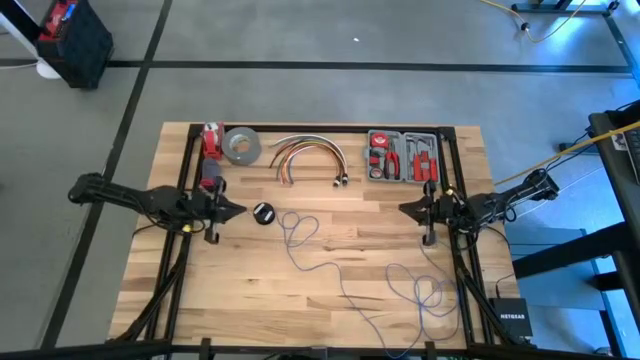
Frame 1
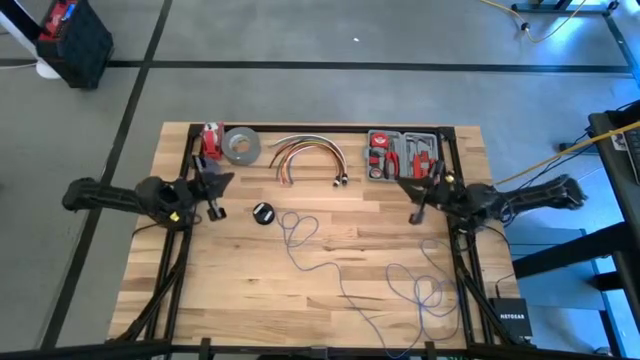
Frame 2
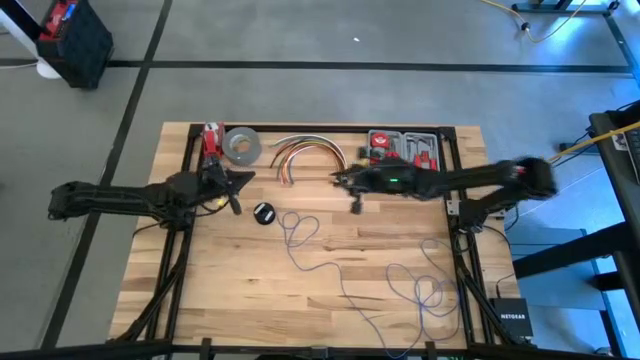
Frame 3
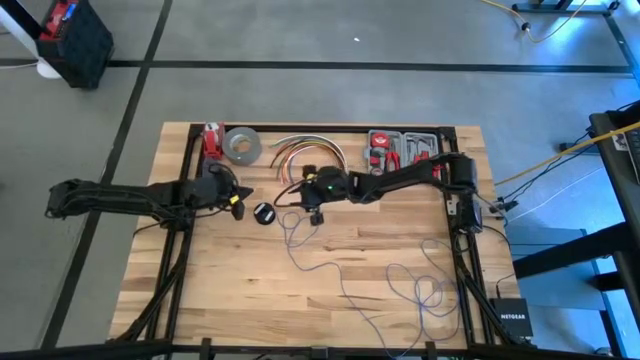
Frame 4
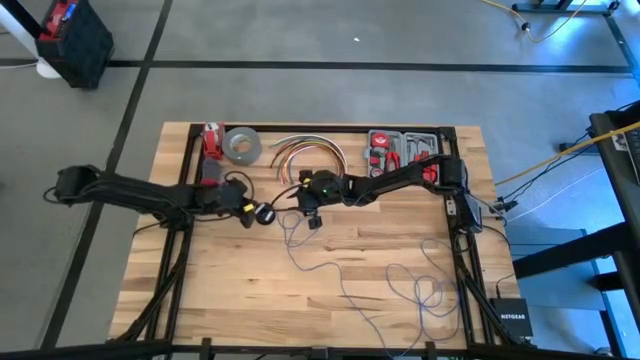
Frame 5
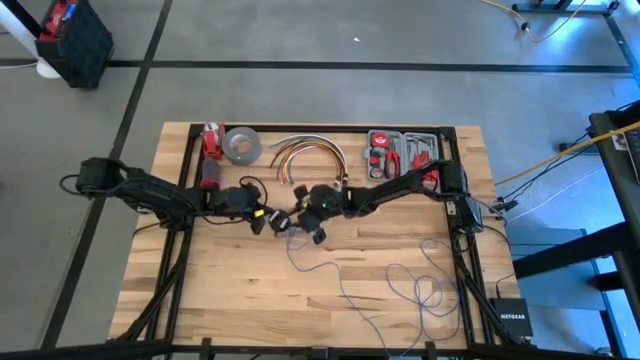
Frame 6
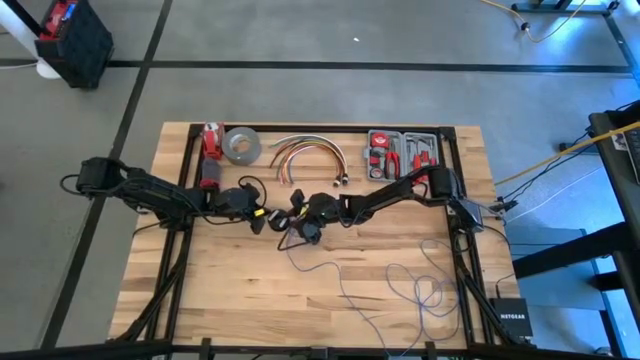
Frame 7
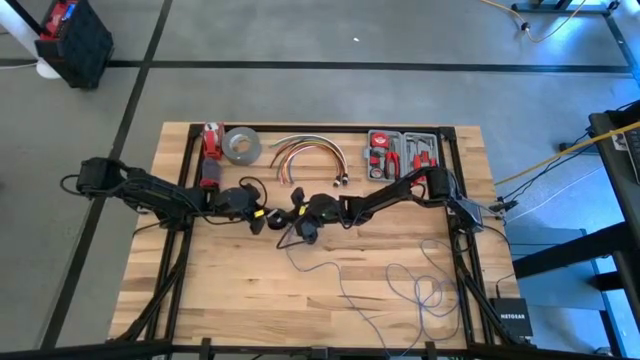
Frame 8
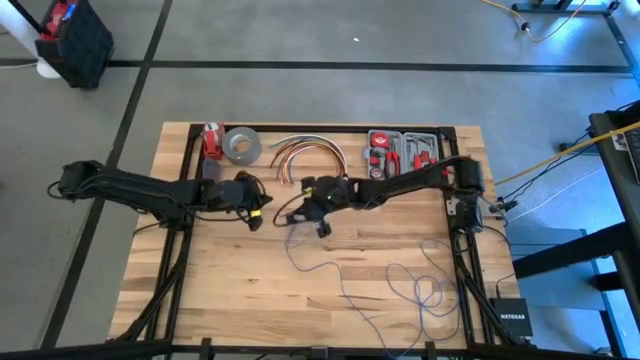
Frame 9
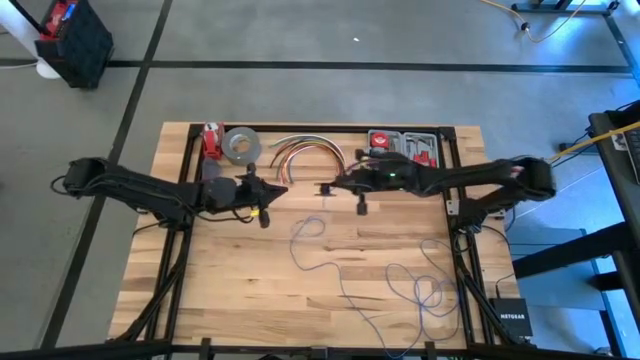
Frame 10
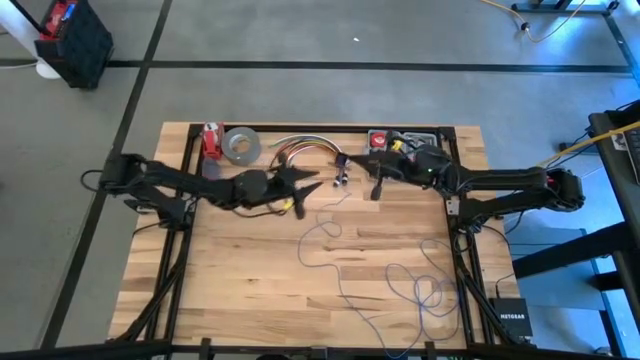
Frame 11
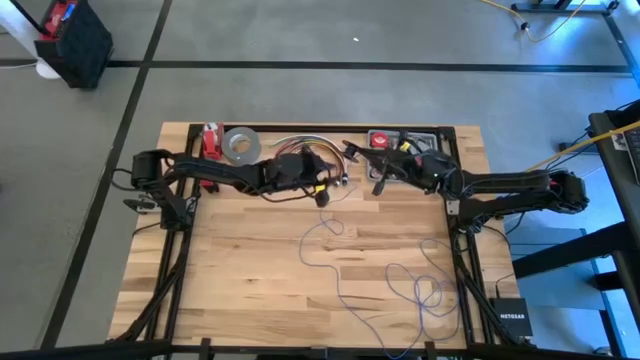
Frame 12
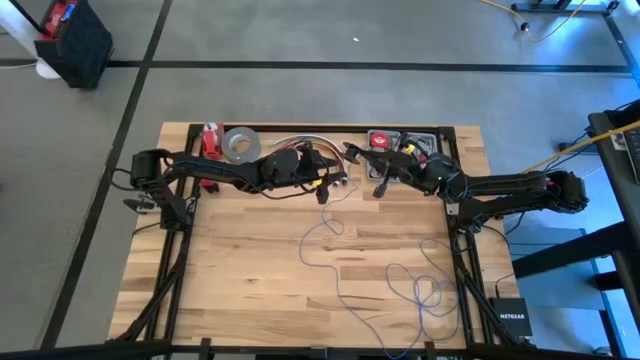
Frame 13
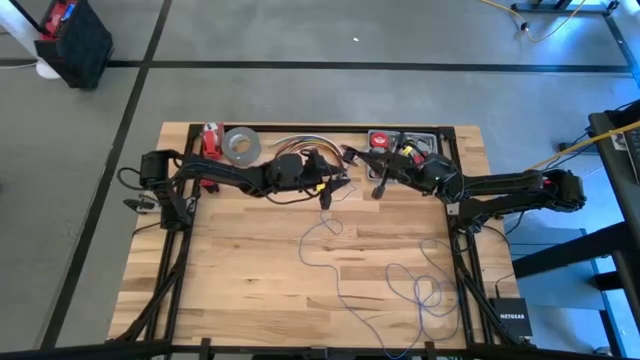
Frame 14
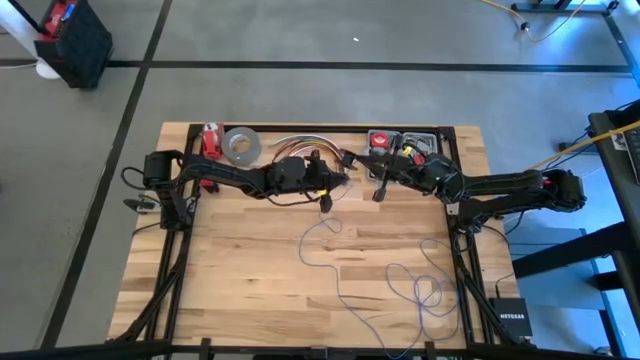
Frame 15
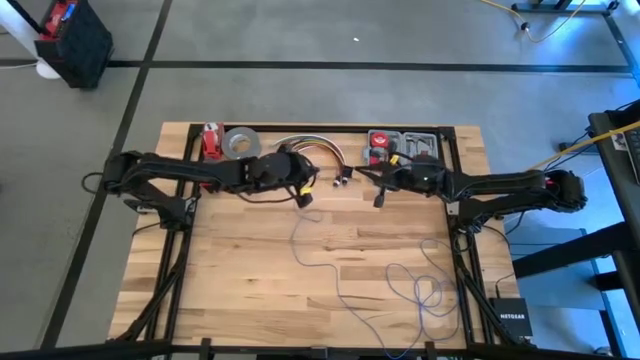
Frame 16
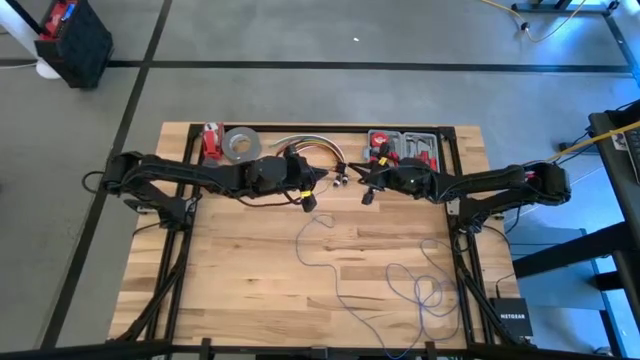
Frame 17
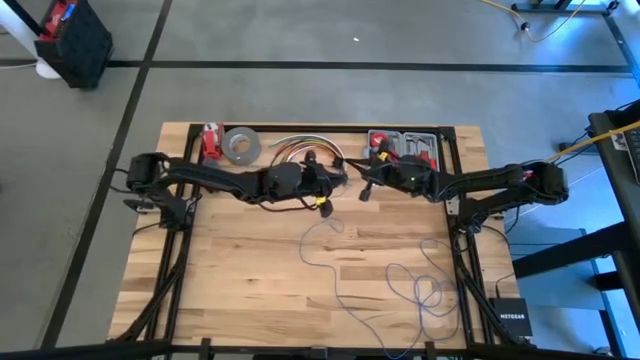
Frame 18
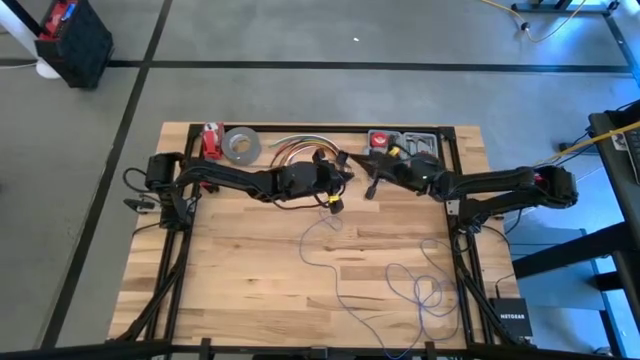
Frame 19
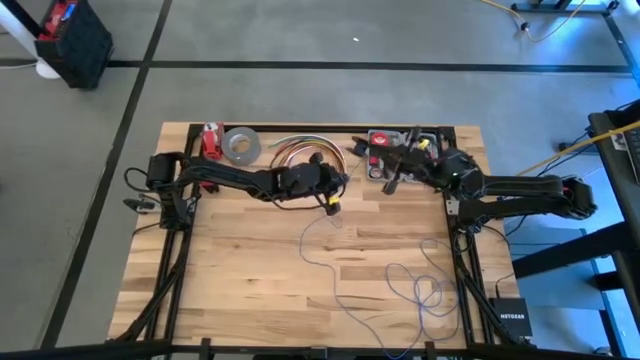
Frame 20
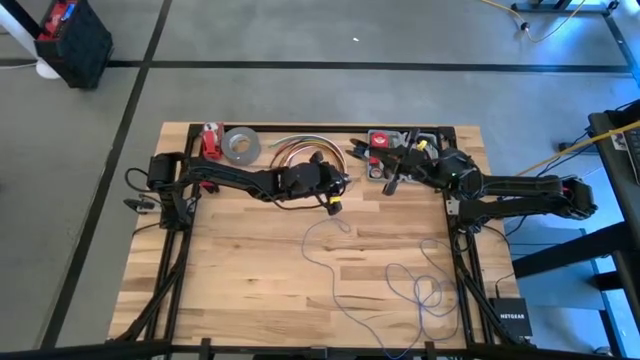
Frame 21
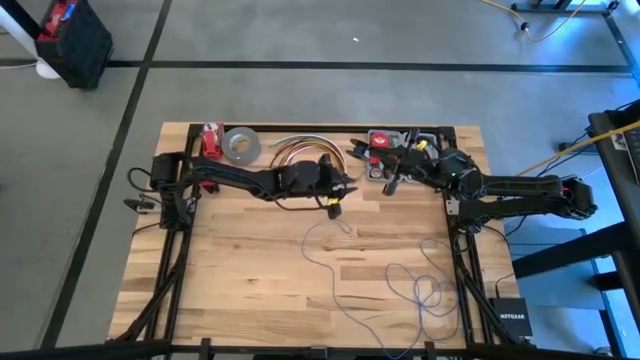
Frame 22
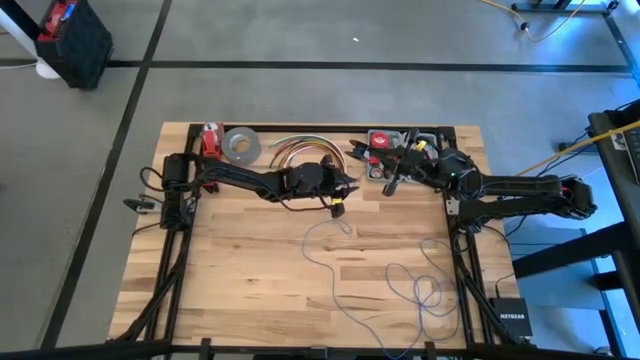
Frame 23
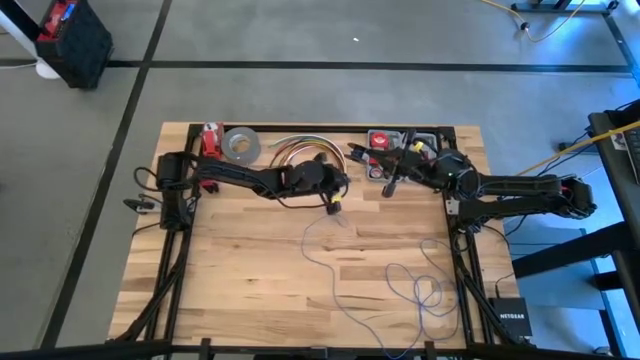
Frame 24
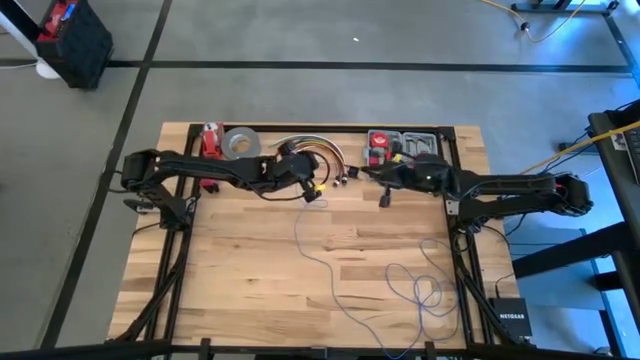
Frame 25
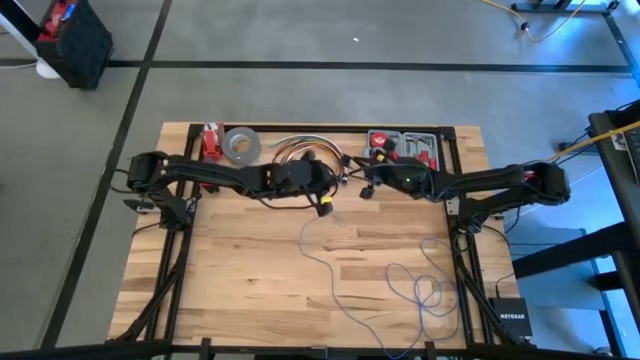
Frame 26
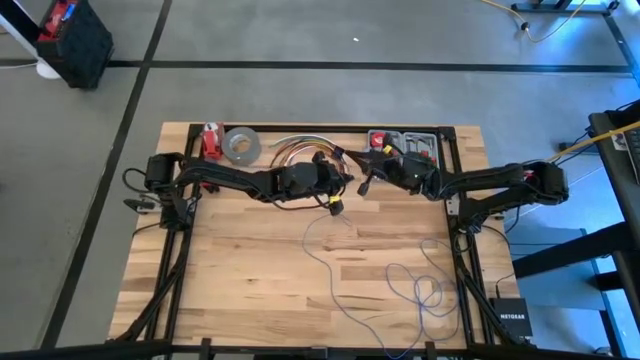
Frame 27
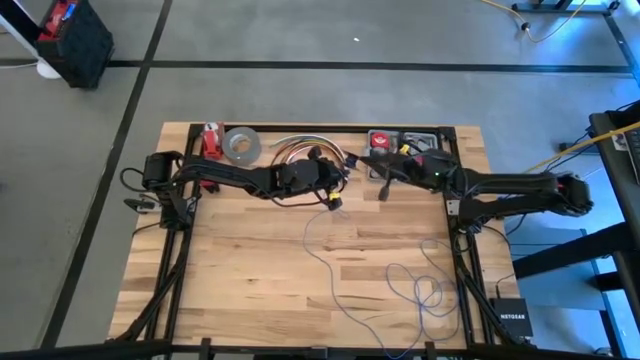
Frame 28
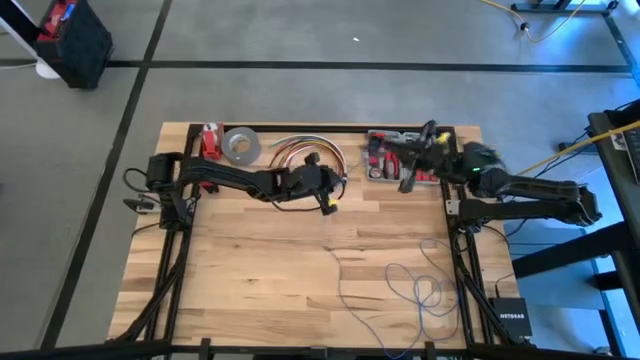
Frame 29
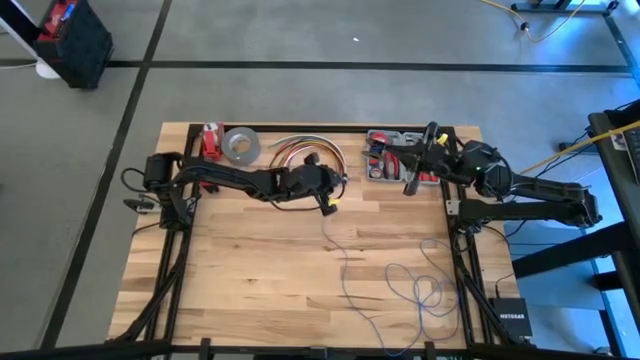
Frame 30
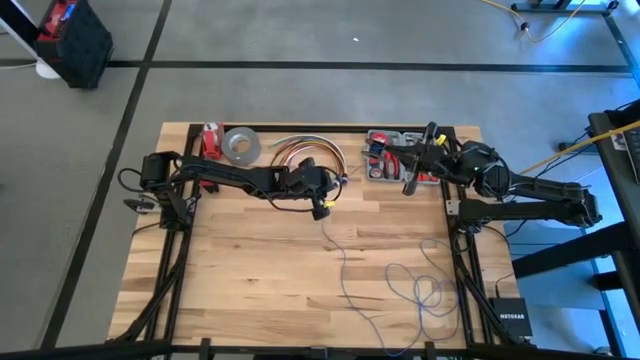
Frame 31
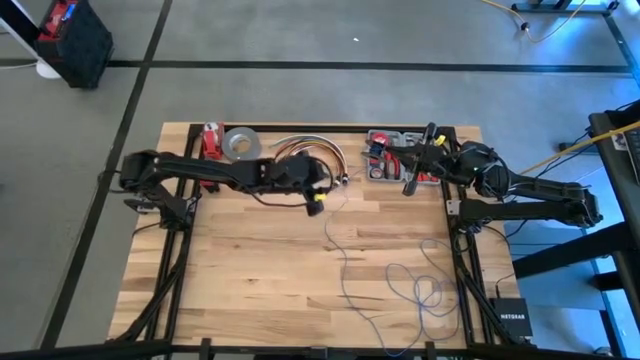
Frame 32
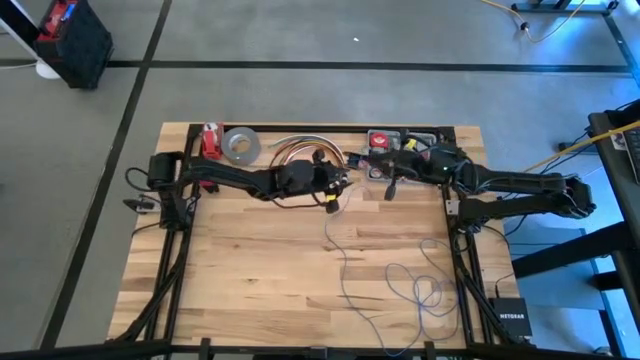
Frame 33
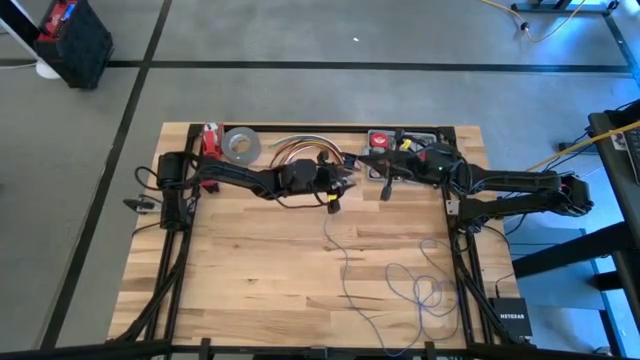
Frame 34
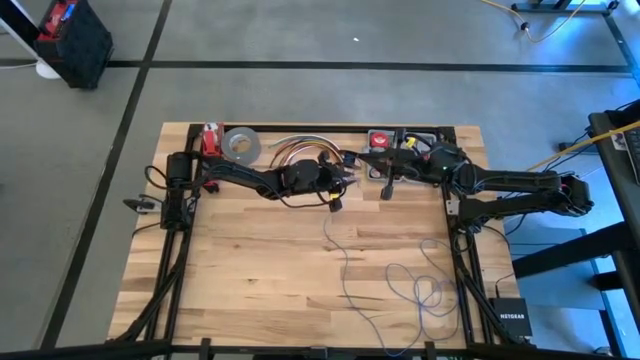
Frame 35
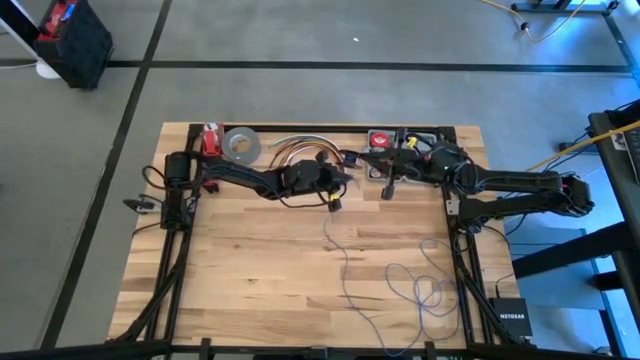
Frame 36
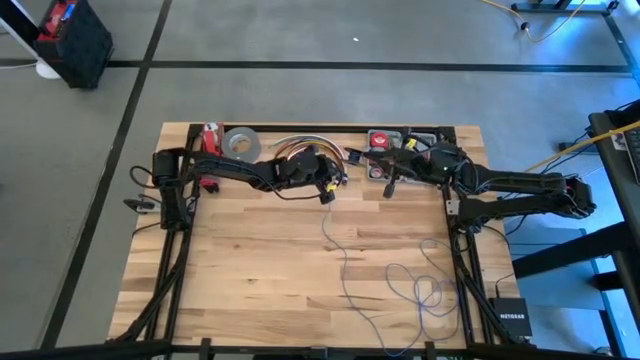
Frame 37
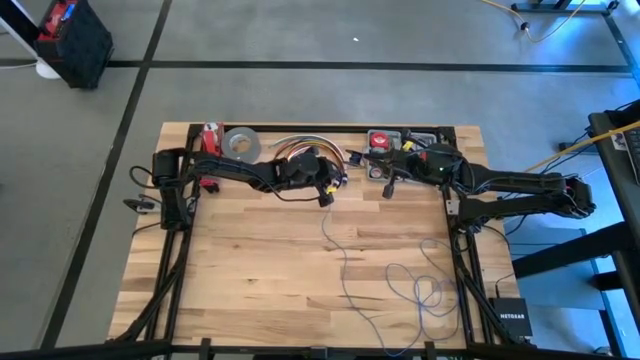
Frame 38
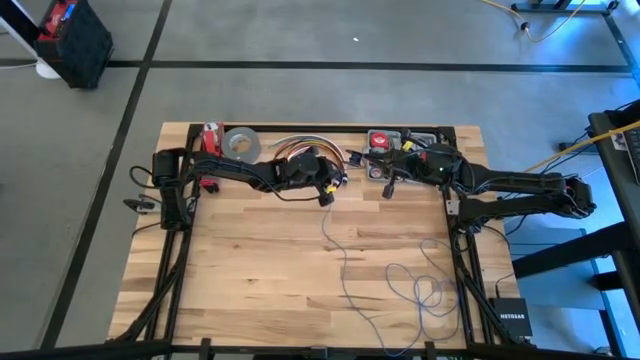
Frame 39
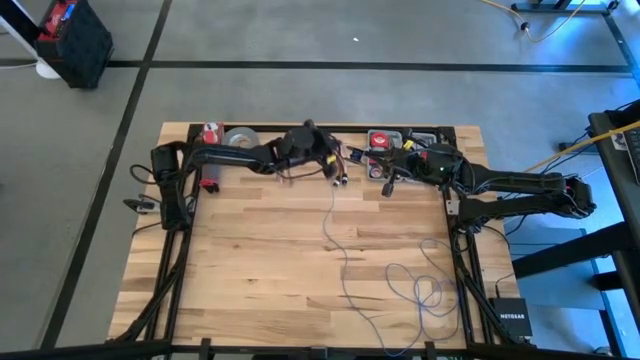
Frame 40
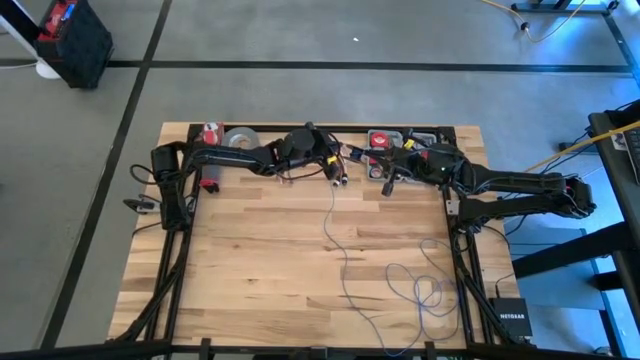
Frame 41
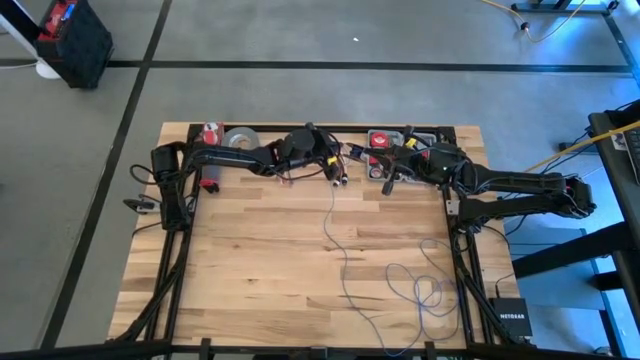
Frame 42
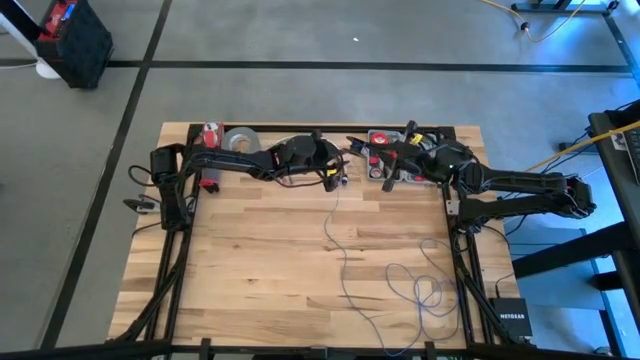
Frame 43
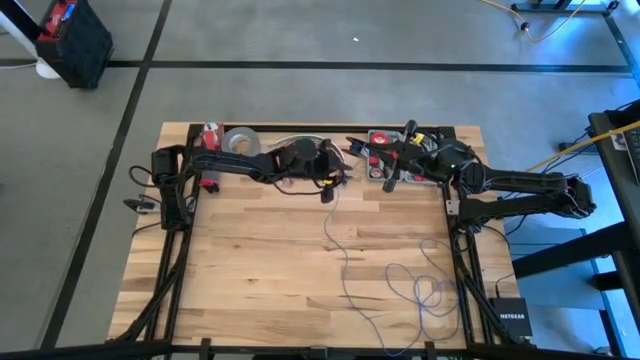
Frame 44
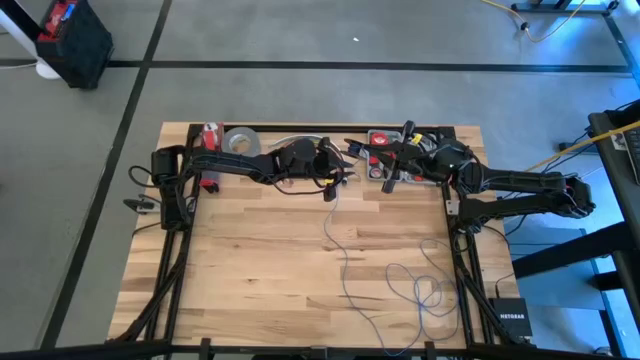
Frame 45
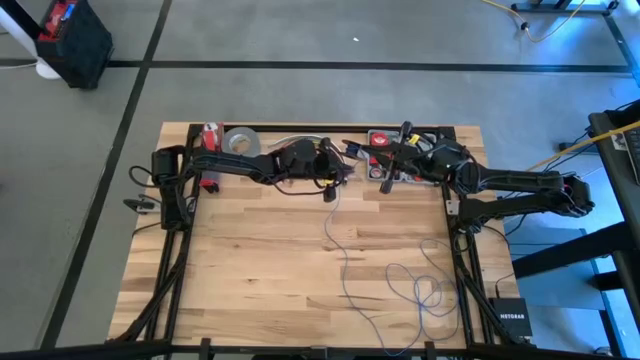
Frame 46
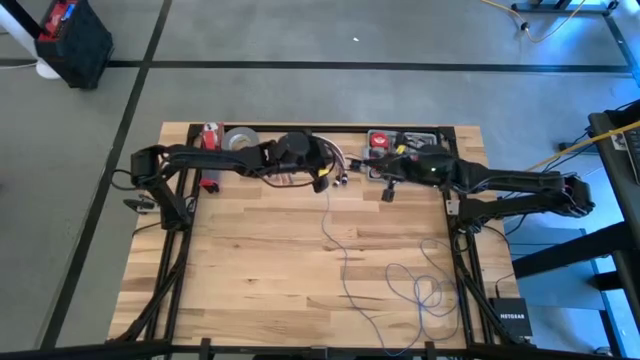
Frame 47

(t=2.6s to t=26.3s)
Task: Coil cords
Coil the blue wire on the black spool
